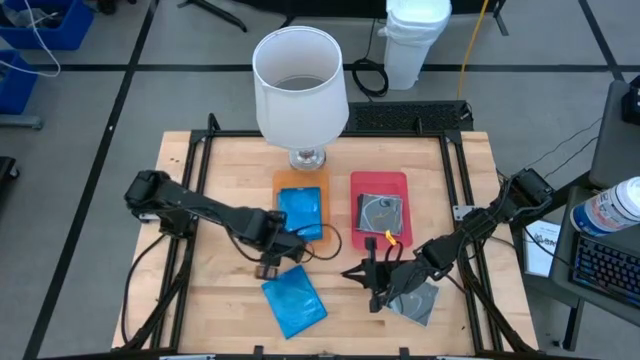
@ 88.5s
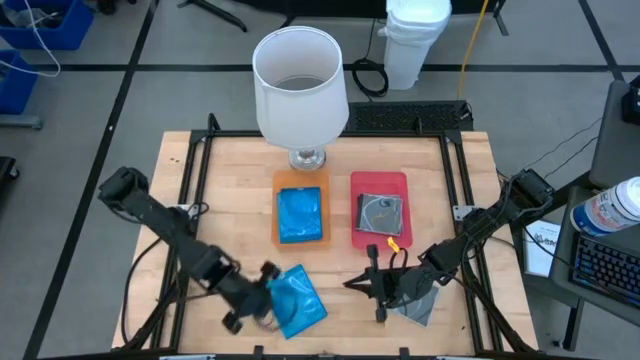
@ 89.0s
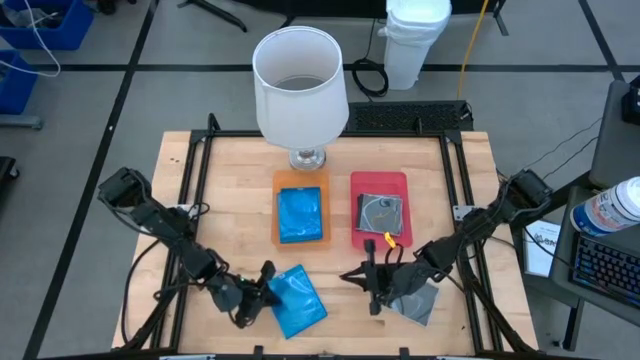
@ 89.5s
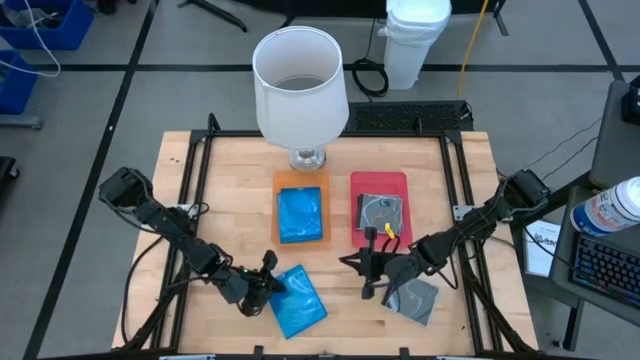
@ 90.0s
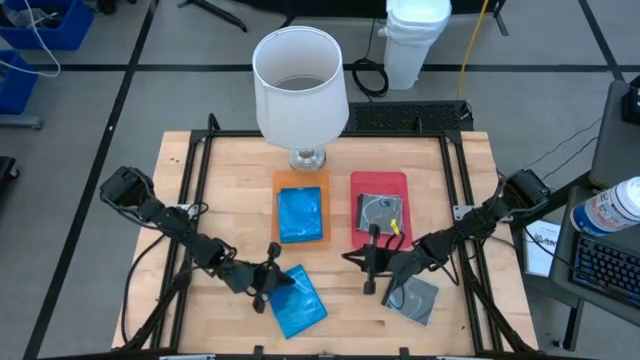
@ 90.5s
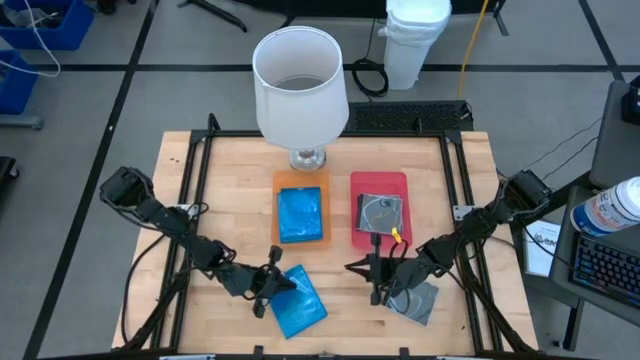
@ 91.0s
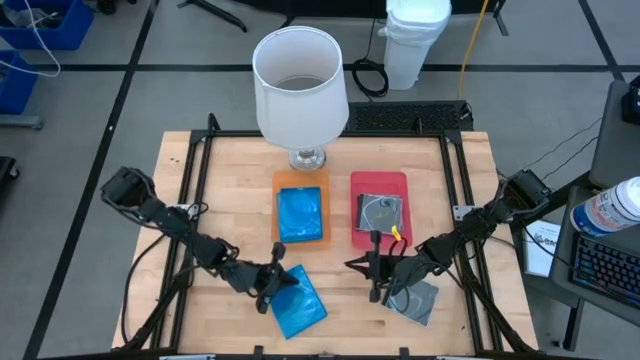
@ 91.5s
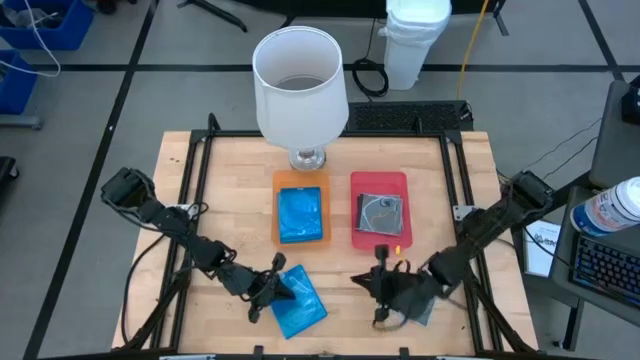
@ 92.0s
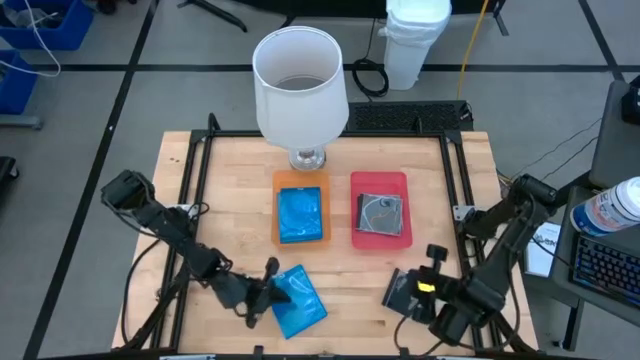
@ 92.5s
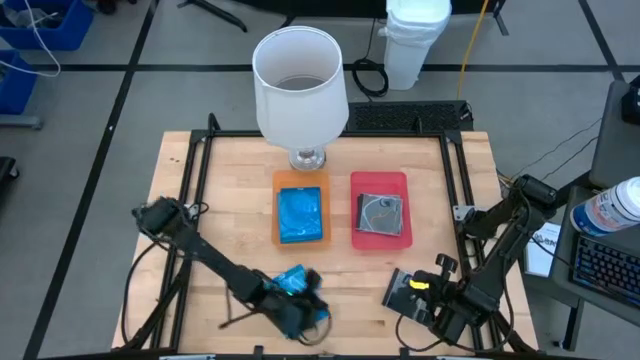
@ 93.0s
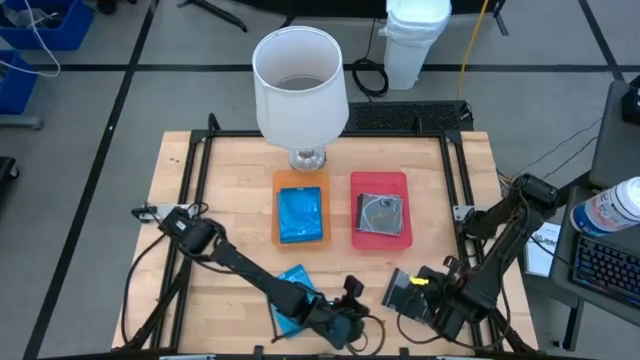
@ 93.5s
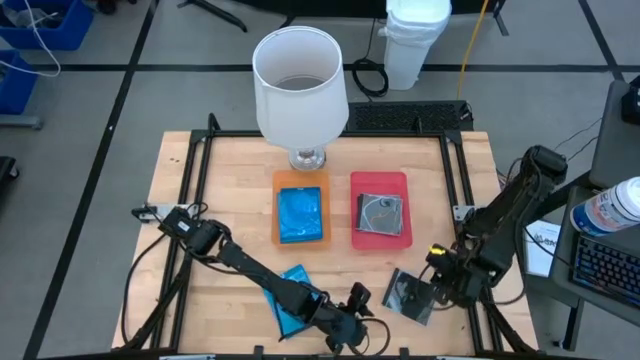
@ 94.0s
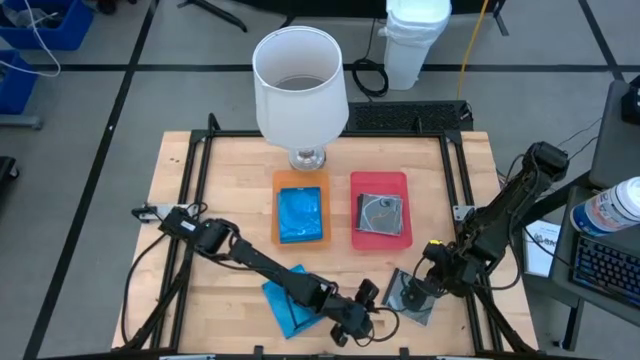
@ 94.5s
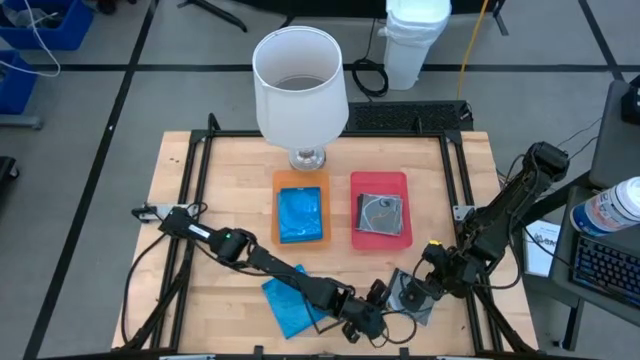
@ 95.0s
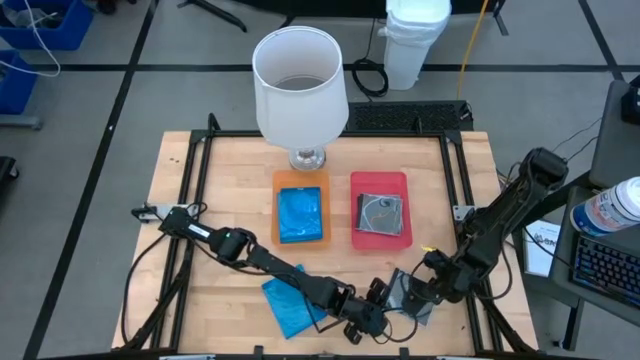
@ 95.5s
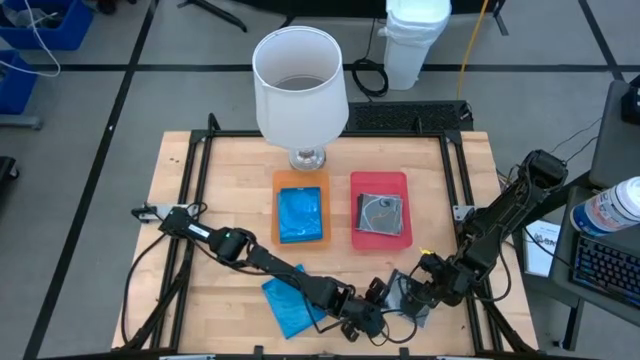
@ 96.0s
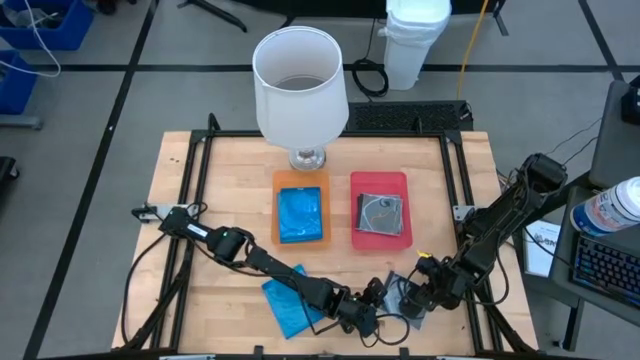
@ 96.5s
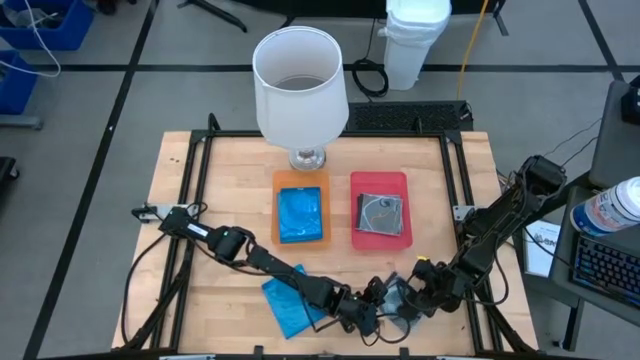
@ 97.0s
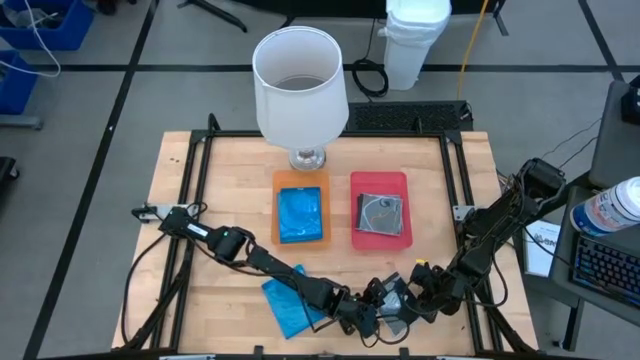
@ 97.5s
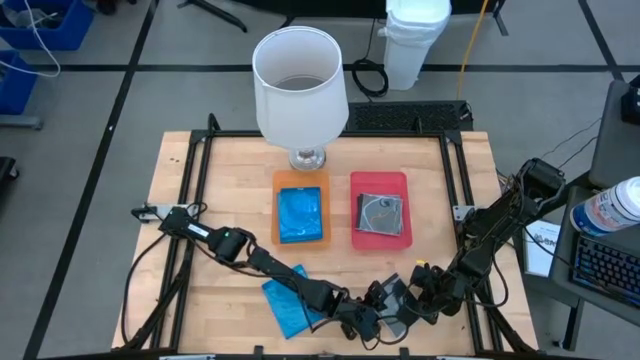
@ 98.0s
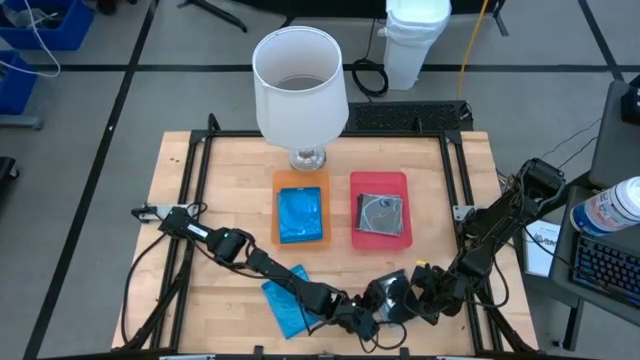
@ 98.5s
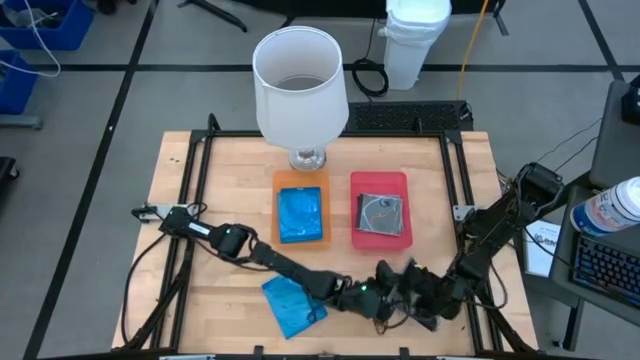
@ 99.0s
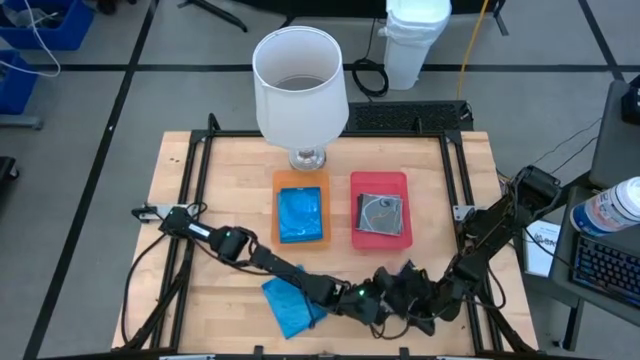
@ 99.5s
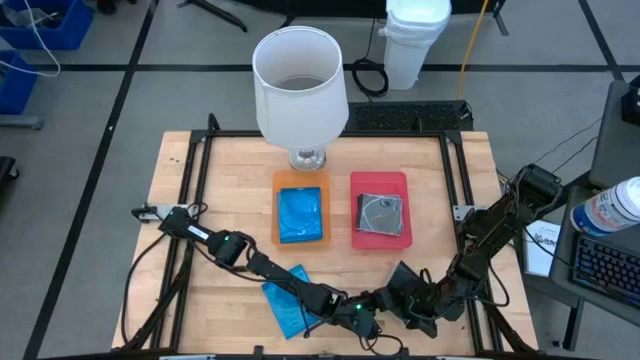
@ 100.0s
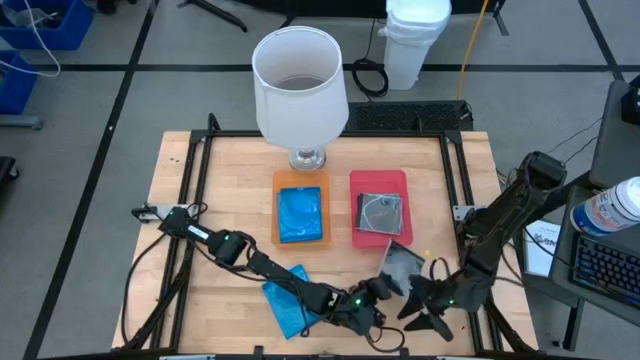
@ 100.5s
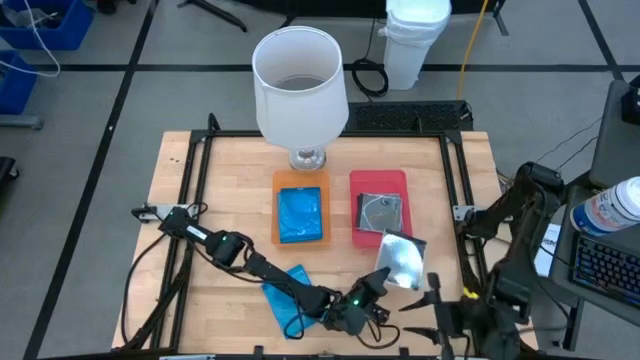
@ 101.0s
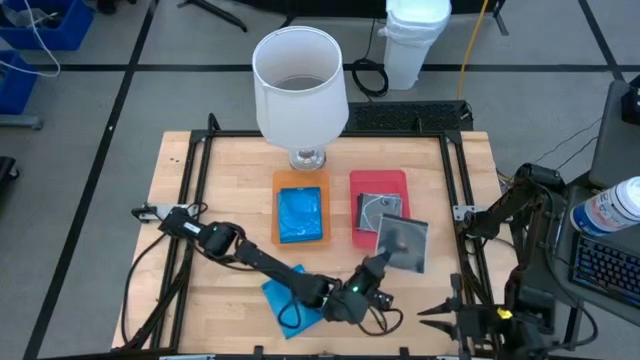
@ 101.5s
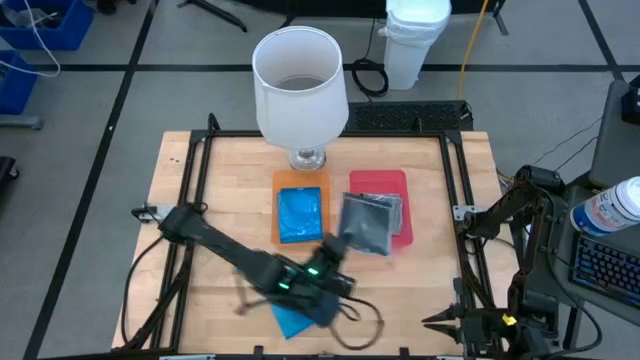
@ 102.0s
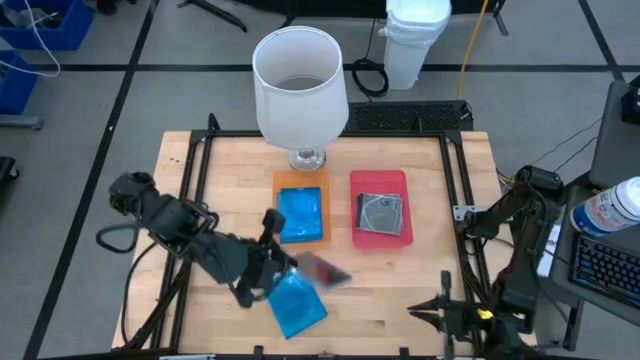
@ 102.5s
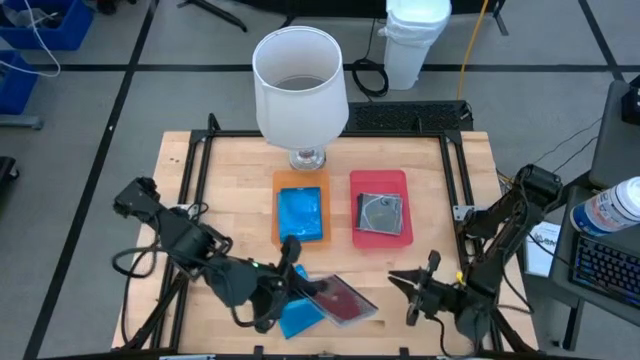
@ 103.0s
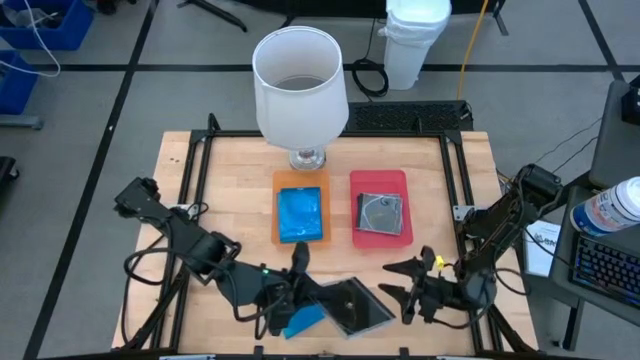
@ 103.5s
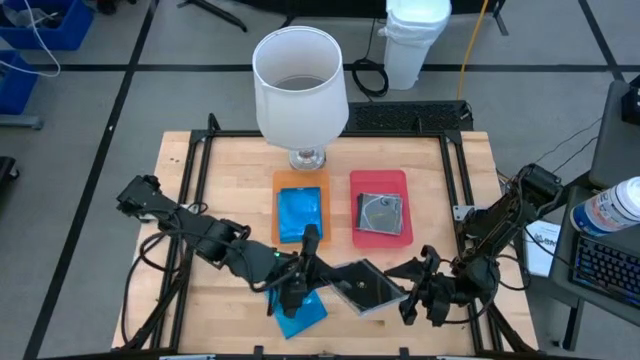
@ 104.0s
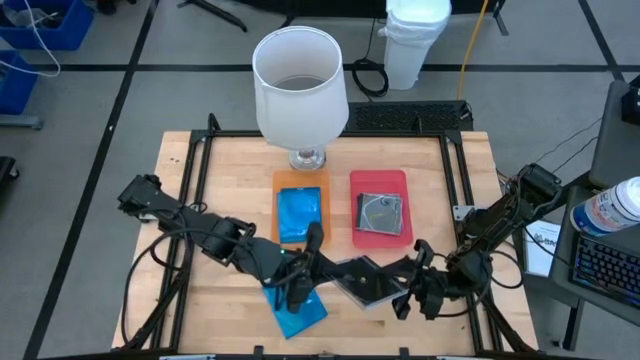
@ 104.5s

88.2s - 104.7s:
Task: Pick & place jewel cases by type
Put the black CD case into the red bin

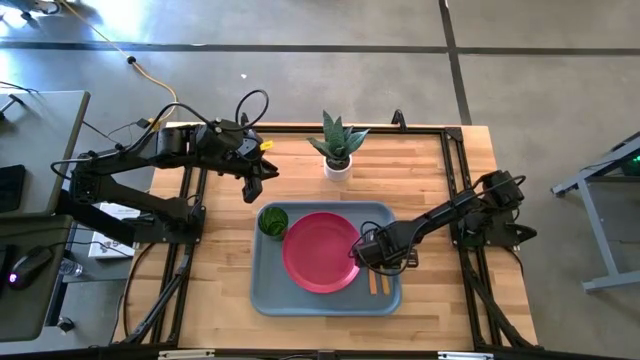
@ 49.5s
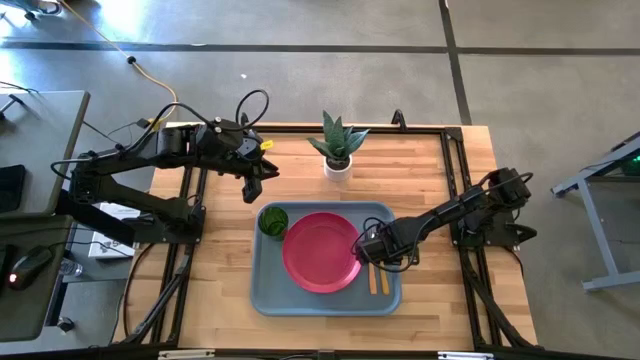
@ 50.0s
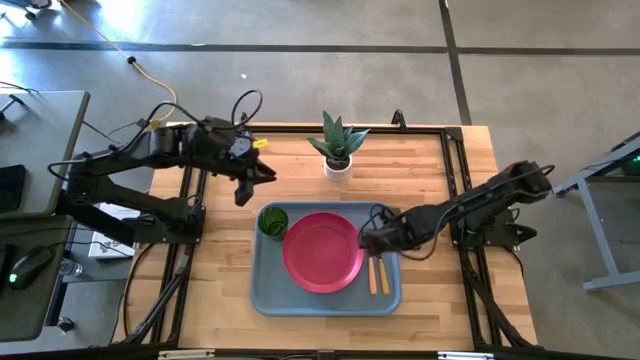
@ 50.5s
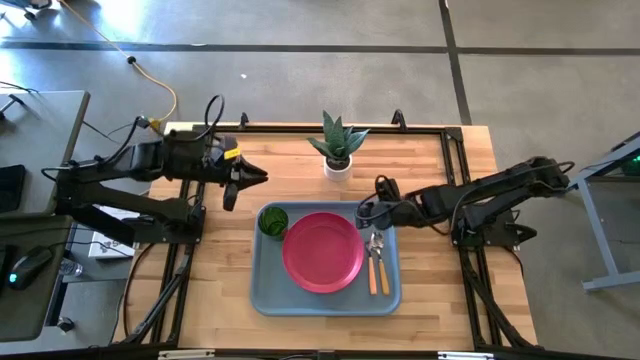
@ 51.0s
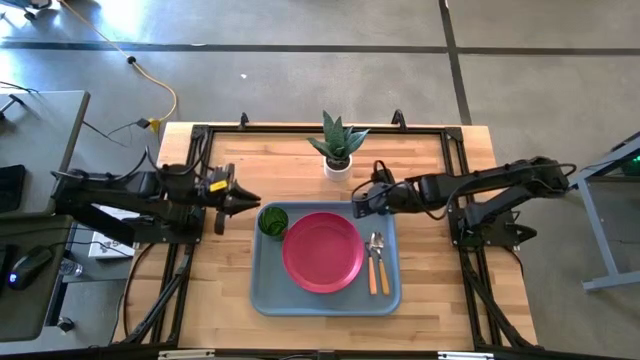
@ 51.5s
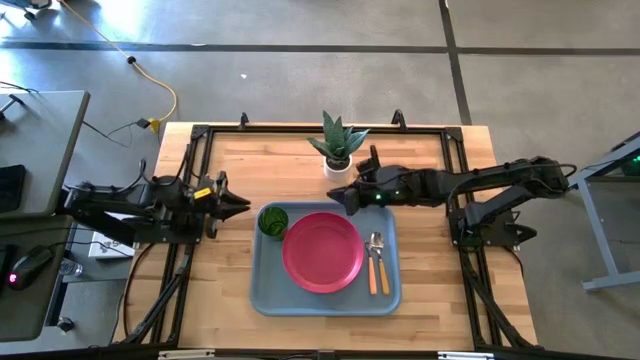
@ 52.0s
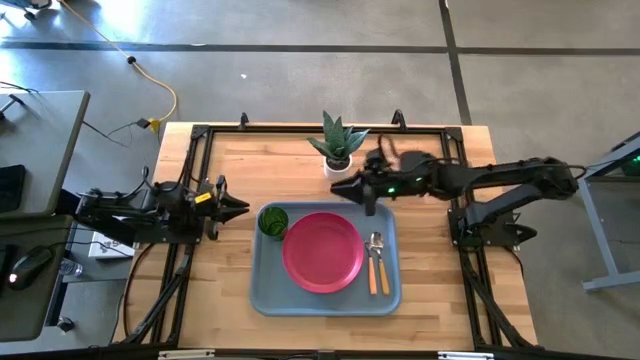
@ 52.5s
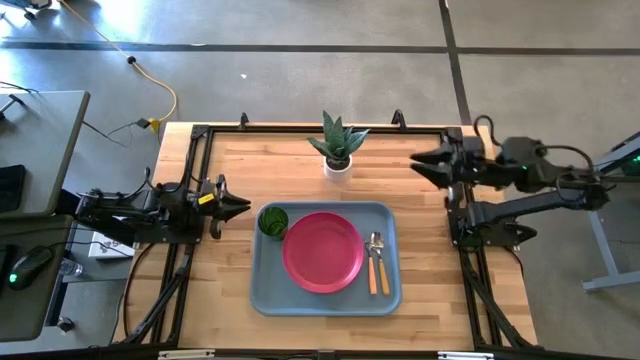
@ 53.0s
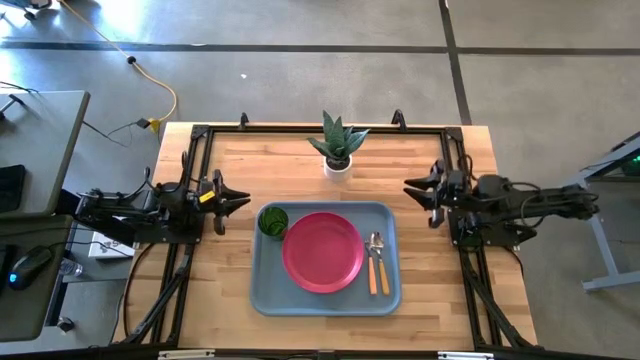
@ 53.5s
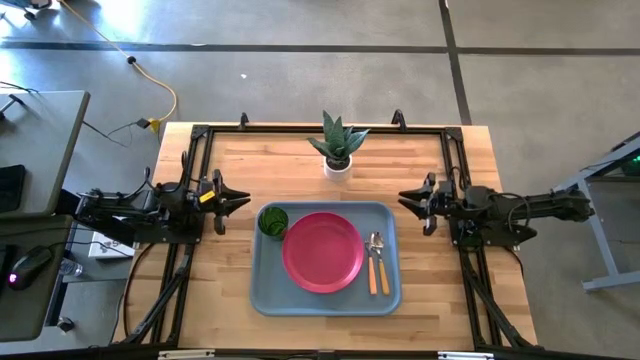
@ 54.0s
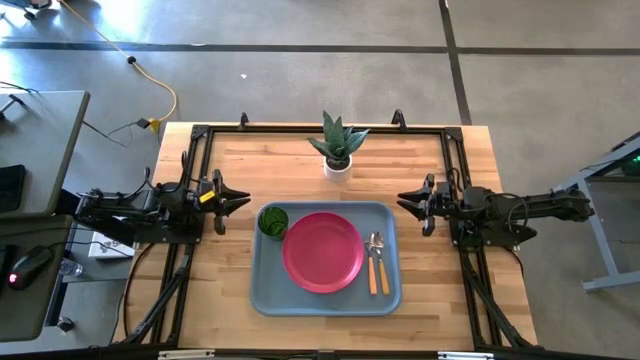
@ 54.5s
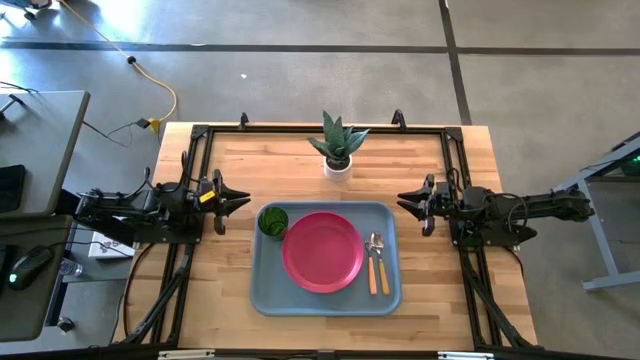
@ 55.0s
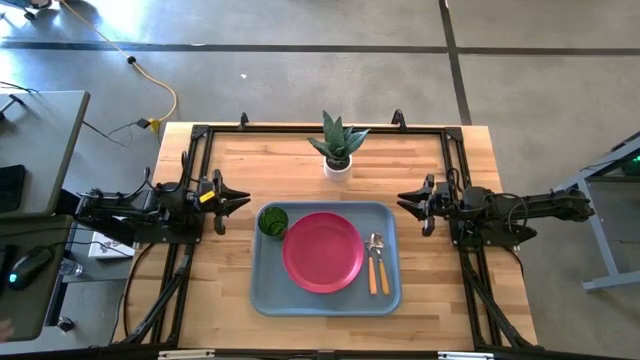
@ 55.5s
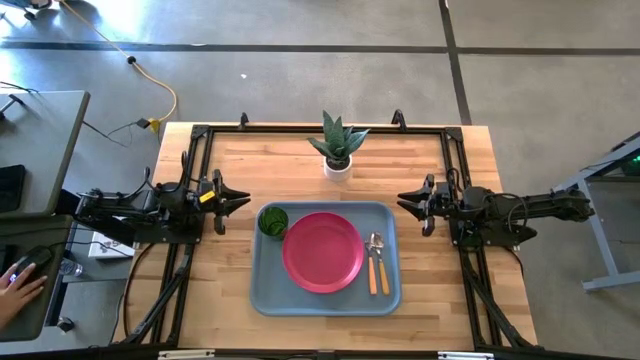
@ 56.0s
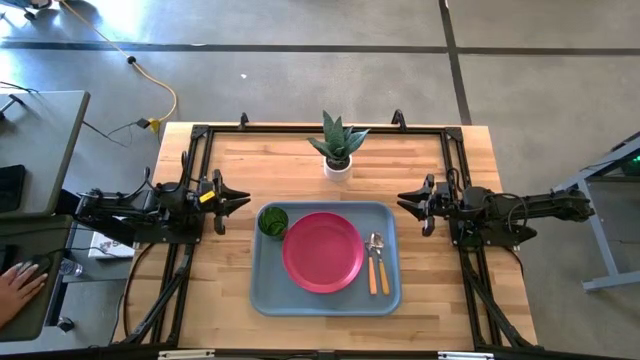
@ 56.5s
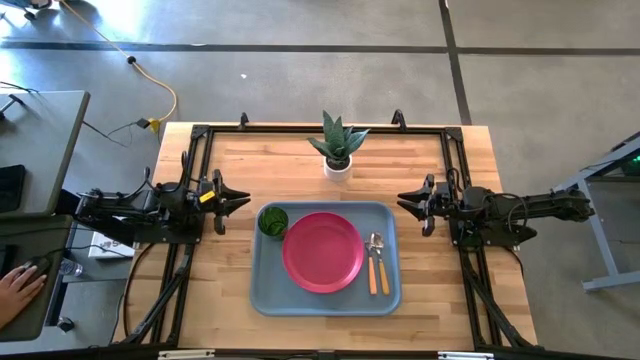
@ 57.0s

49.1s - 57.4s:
Task: Pick and place plate/cup/fork/spoon on tray
Return to Home Position
